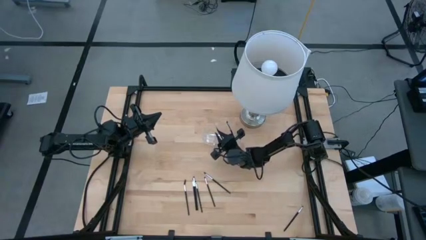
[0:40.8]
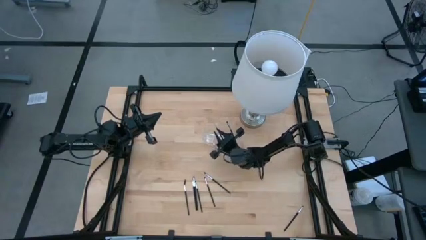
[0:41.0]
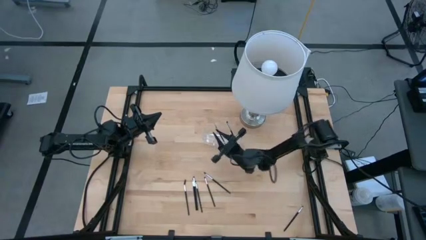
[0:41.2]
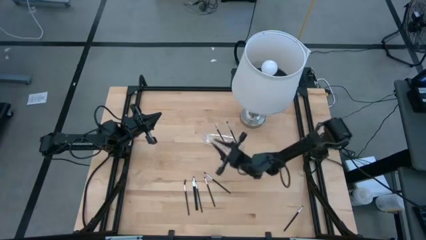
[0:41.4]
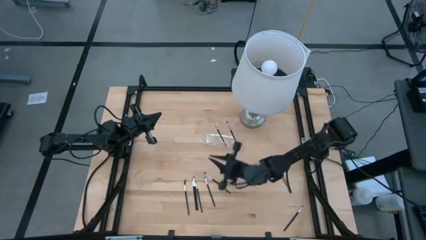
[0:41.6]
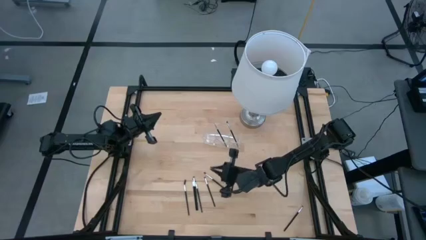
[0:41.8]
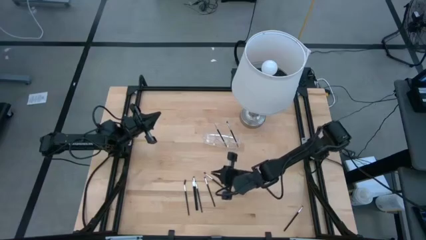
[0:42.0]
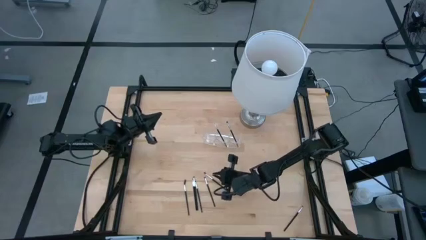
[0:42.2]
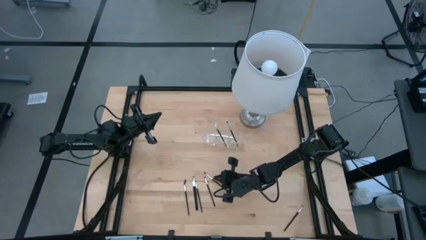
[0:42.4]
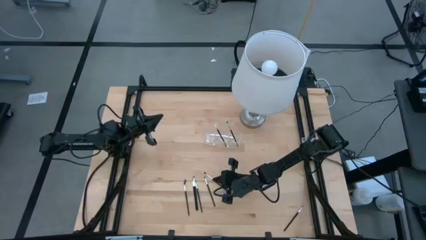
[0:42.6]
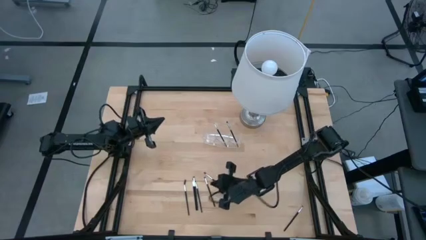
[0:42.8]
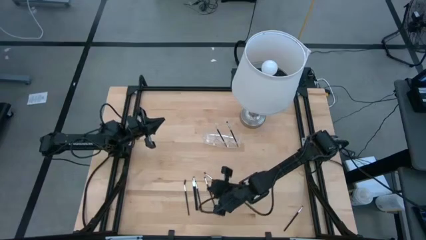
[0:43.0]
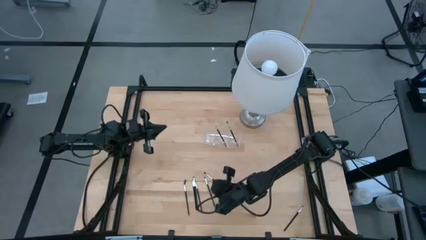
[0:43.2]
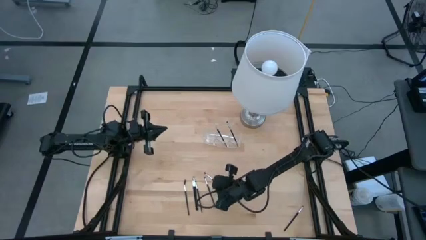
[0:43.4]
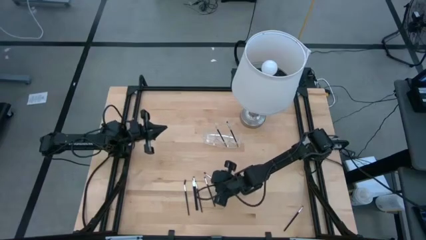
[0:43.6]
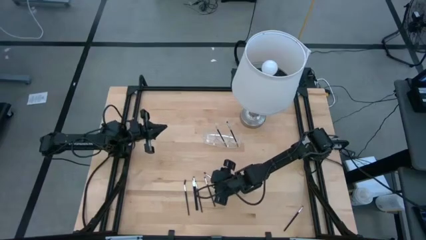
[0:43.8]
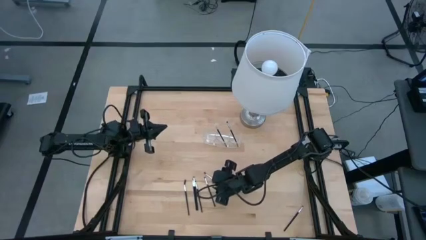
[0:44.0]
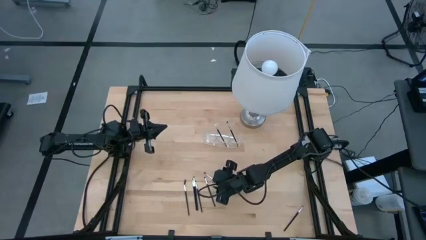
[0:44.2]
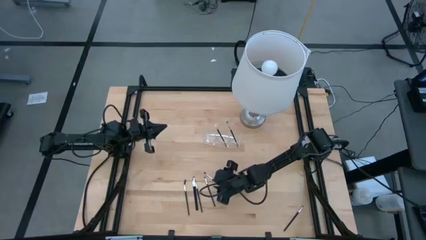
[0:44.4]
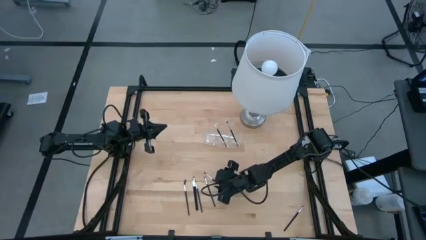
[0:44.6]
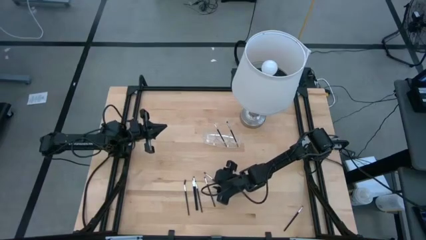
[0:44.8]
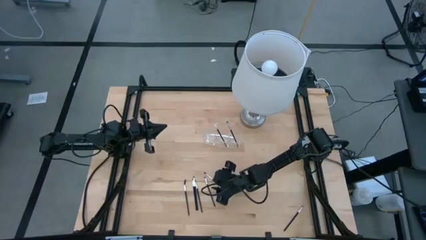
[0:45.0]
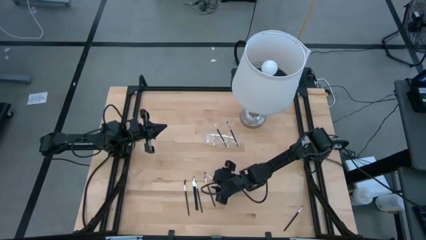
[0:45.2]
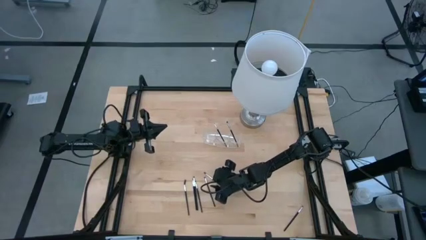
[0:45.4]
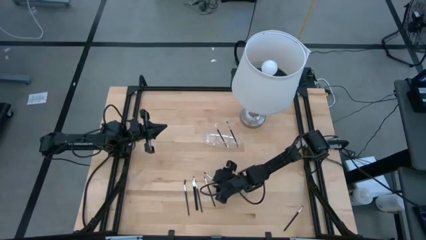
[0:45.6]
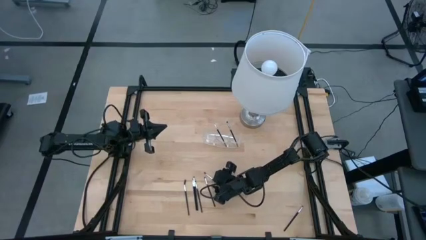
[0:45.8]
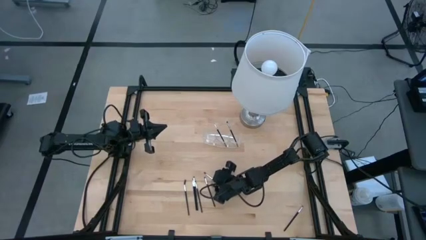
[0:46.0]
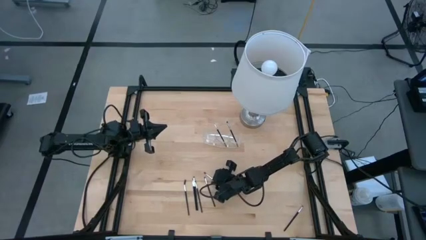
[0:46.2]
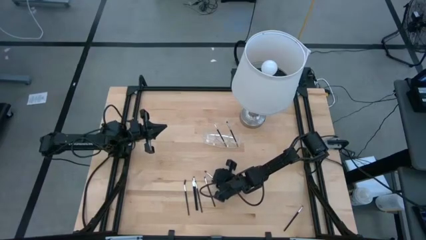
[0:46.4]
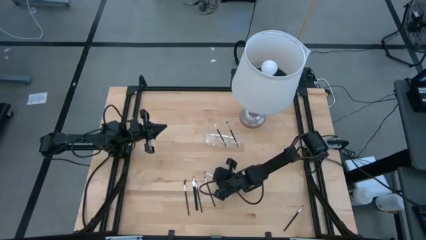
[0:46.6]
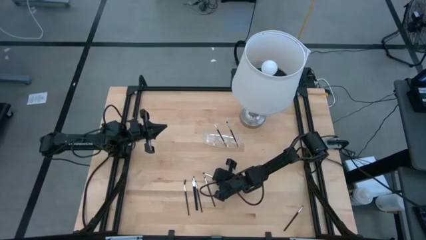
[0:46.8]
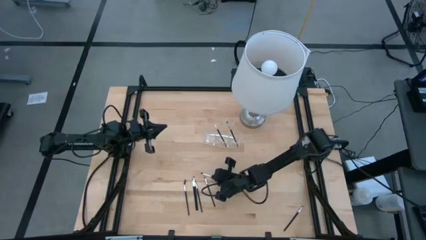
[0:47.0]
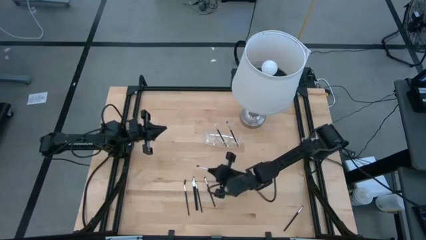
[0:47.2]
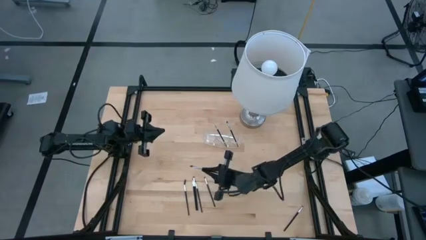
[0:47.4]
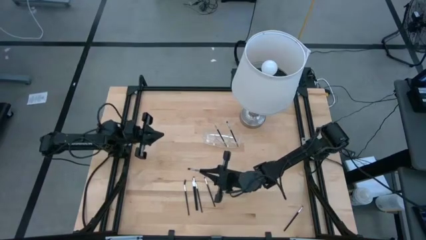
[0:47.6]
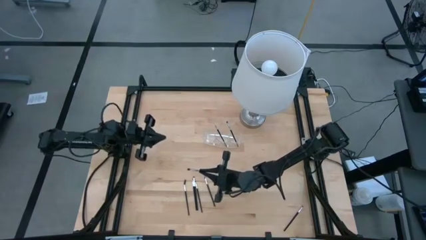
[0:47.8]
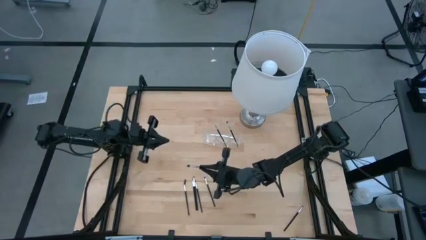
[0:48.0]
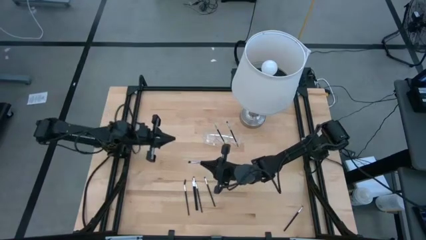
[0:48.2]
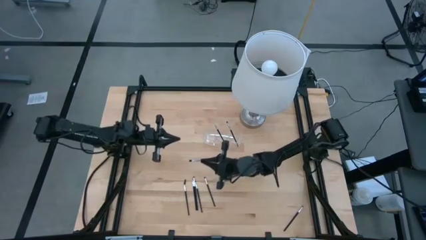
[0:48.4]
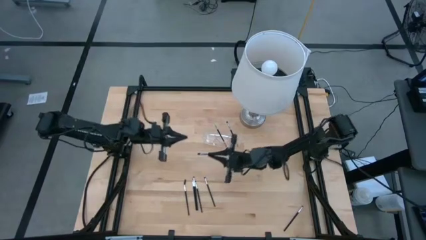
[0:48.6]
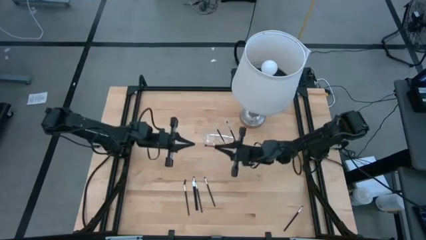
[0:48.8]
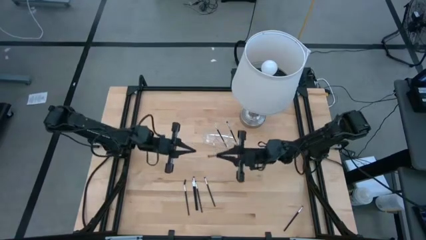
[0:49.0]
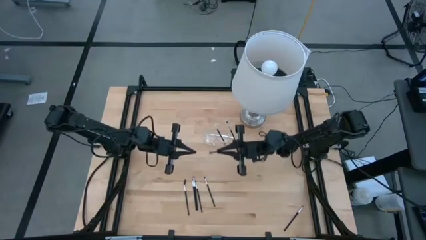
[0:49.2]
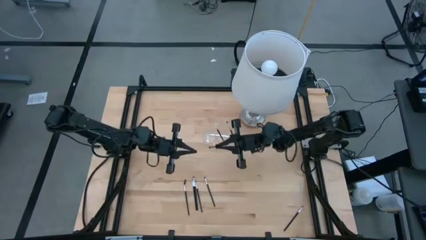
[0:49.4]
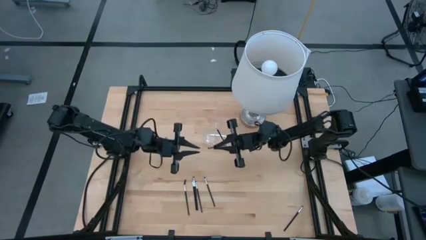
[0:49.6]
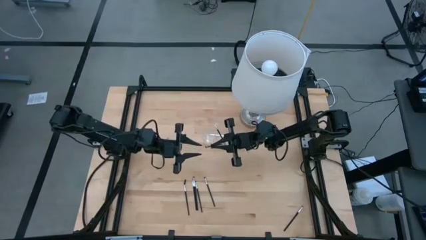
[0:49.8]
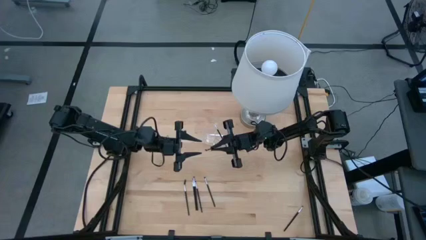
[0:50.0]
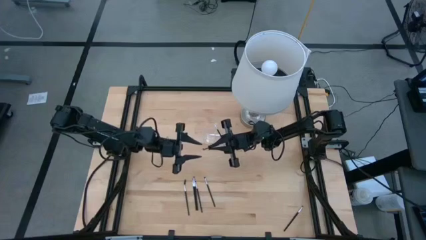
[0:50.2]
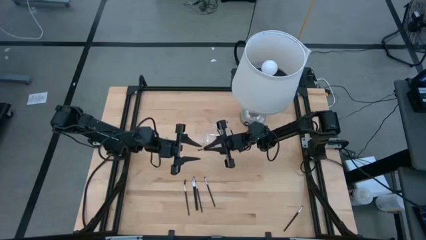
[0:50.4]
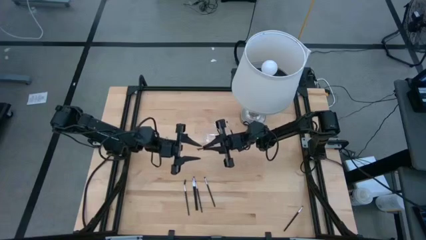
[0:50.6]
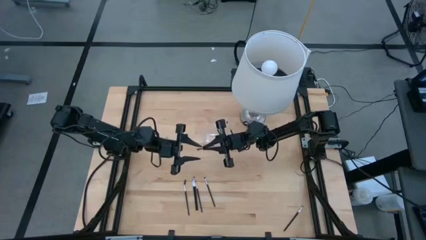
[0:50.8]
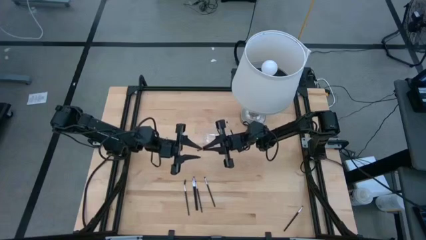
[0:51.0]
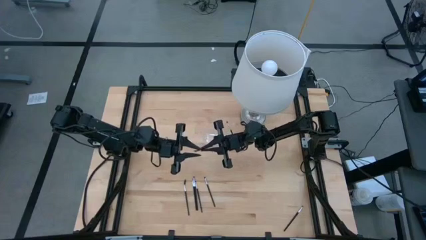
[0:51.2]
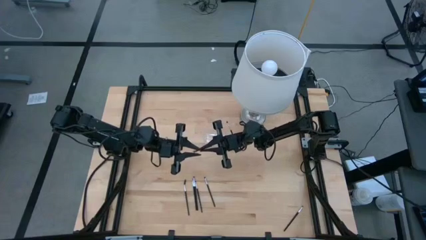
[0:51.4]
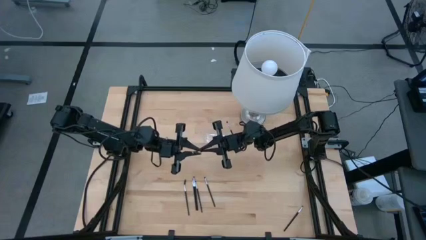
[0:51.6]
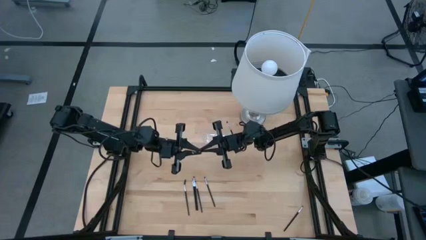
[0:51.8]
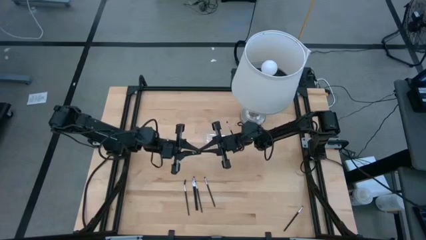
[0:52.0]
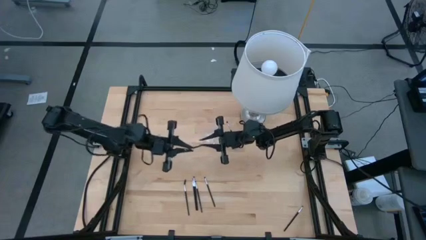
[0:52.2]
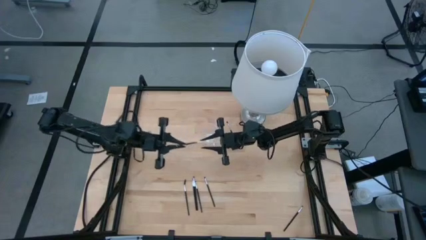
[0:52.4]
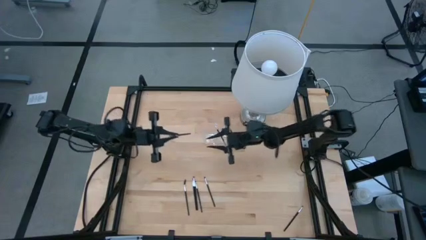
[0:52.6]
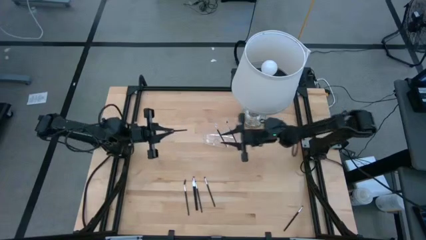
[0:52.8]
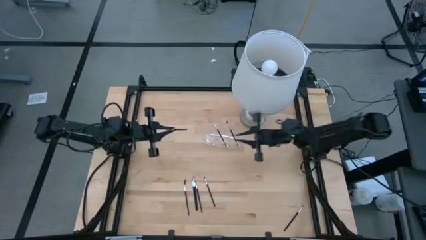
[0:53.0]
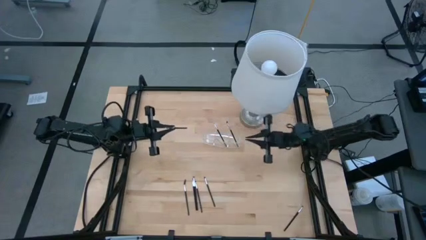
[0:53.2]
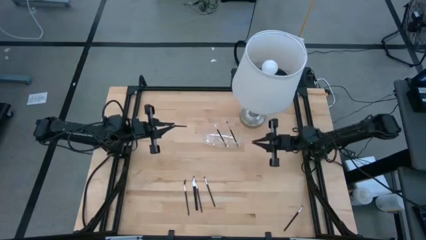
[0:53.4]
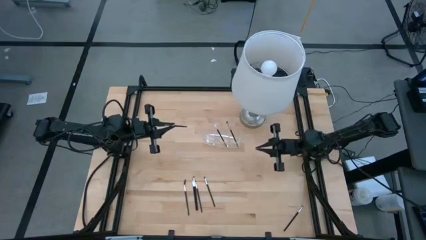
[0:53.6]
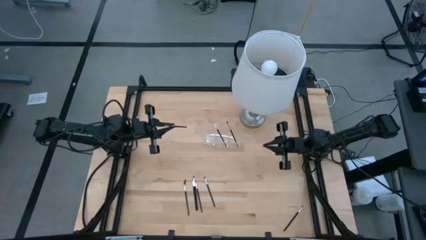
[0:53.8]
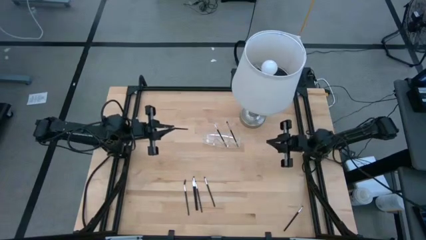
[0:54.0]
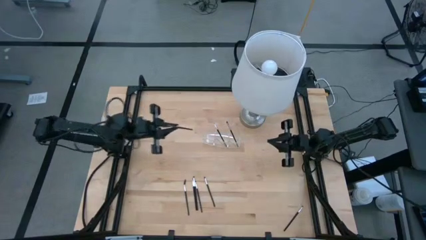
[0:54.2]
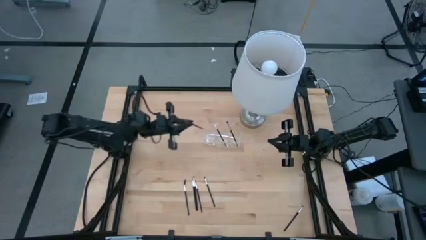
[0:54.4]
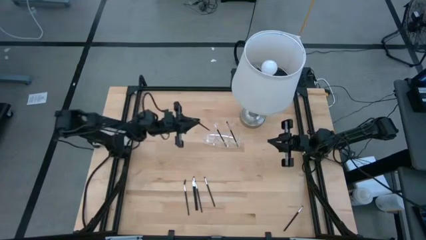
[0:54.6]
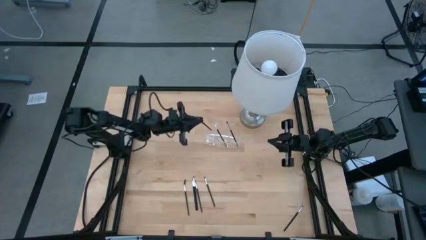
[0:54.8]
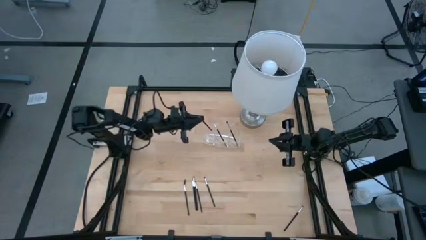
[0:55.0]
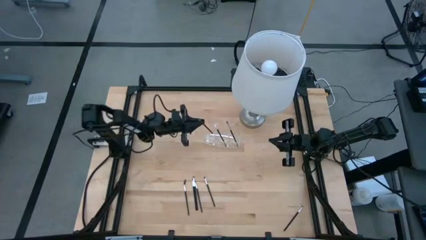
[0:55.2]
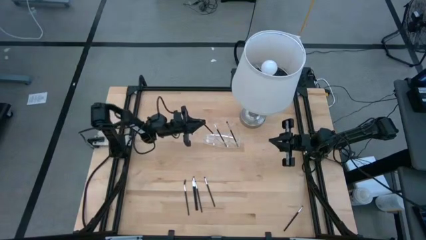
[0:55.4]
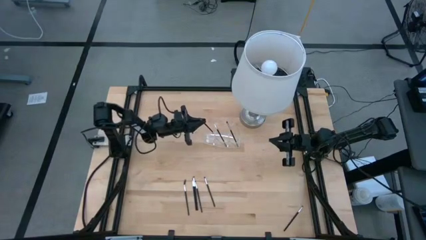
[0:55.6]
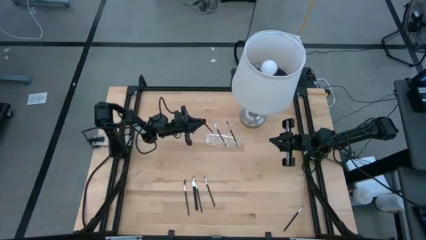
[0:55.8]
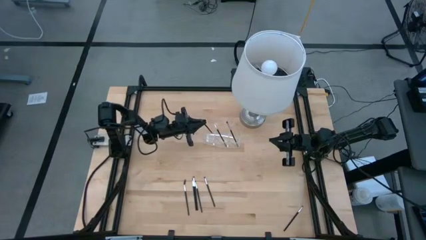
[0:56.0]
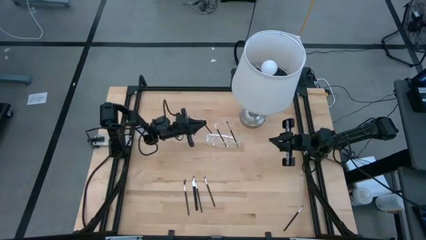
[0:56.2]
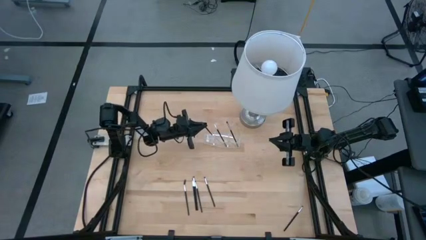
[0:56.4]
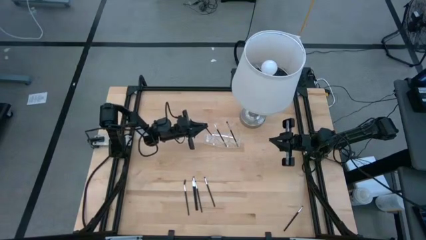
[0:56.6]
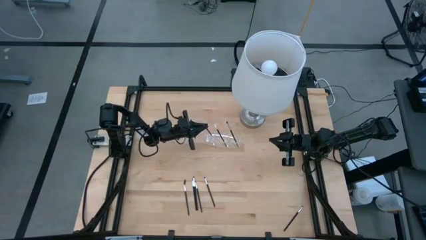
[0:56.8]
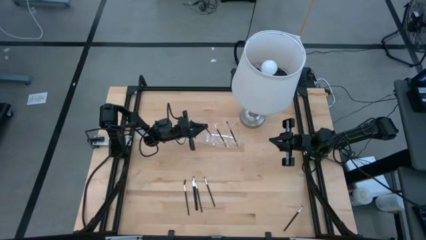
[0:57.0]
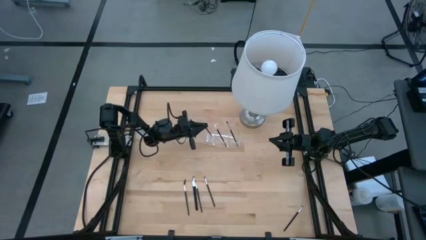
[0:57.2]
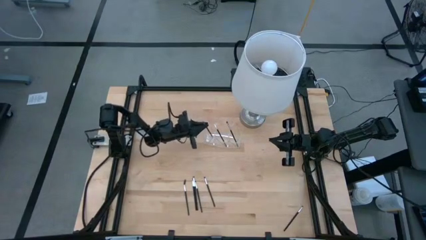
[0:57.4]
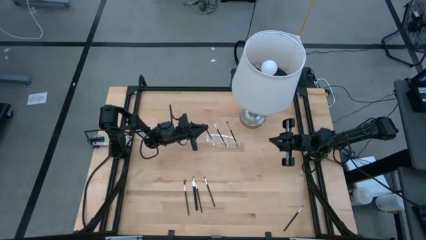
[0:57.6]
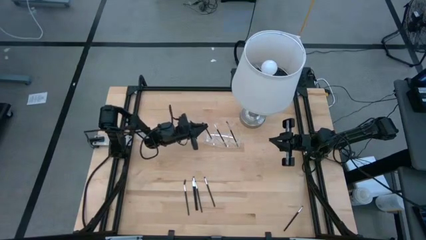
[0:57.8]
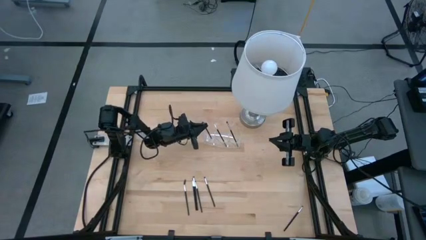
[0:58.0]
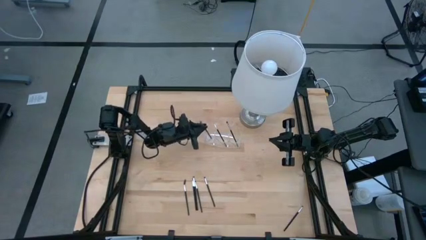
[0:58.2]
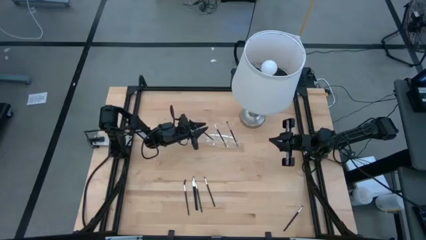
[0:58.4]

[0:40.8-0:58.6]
Task: Pick & Place Makeup Brushes
Put the black eyeshadow brush into the transparent organizer
